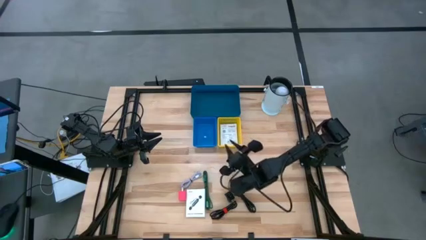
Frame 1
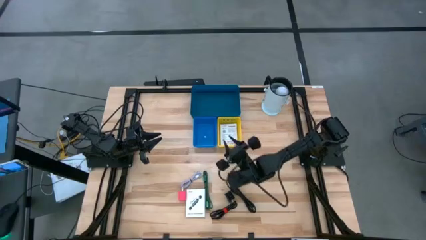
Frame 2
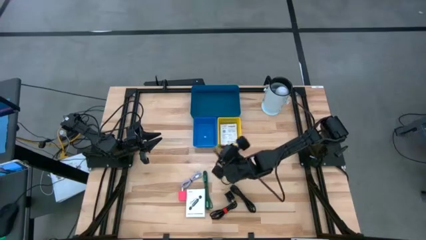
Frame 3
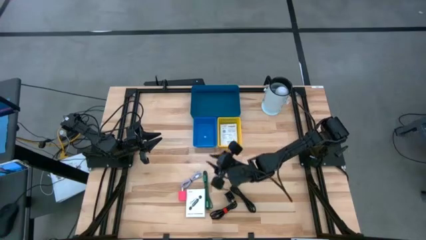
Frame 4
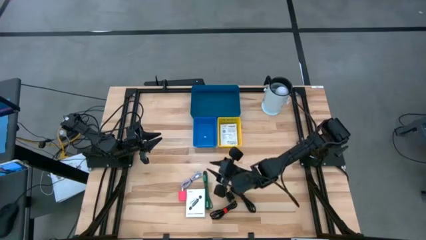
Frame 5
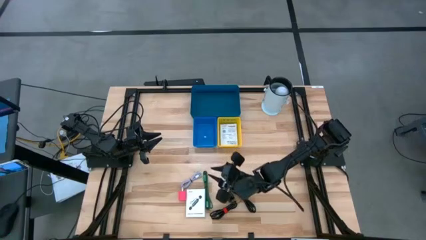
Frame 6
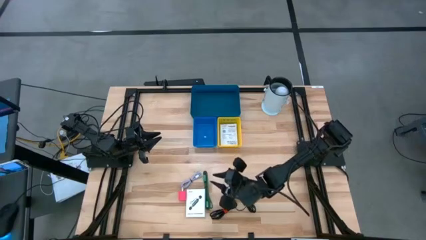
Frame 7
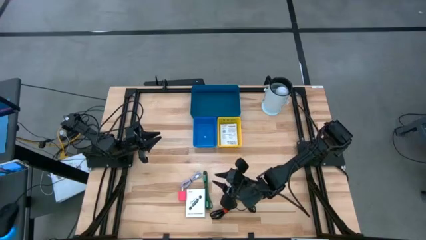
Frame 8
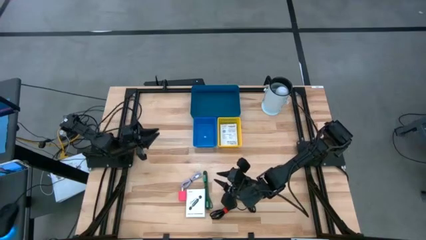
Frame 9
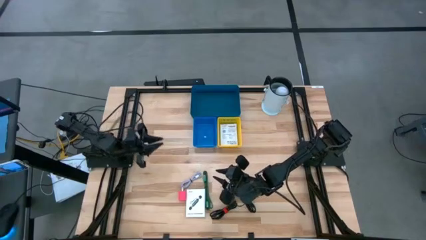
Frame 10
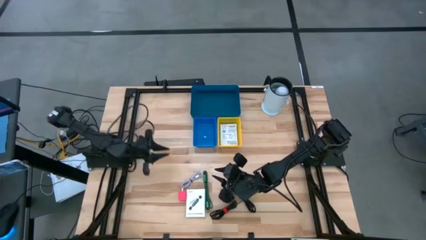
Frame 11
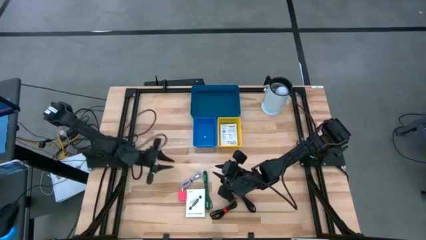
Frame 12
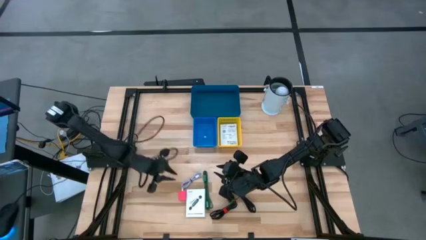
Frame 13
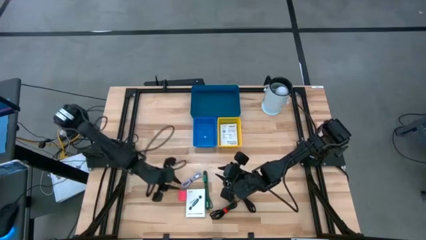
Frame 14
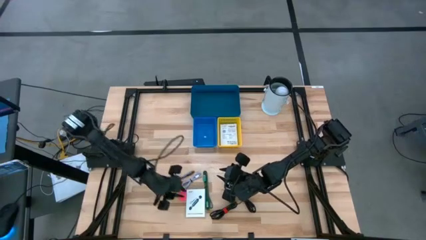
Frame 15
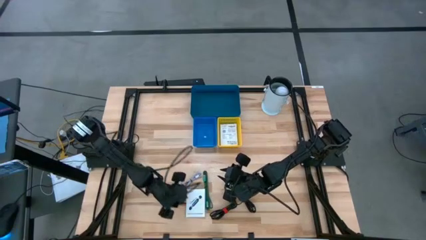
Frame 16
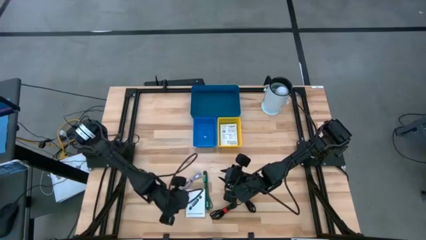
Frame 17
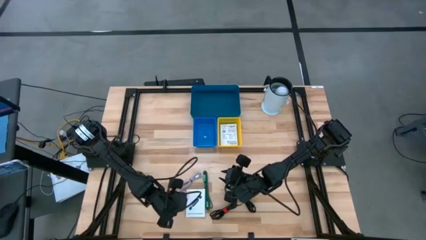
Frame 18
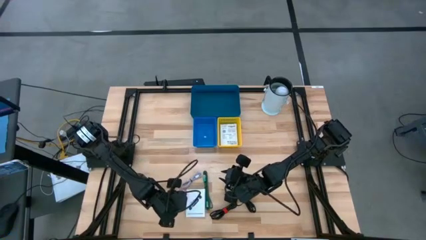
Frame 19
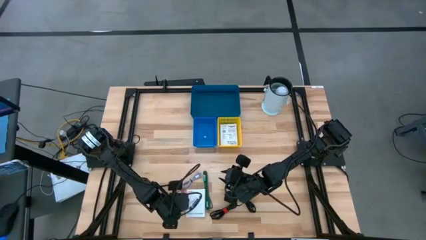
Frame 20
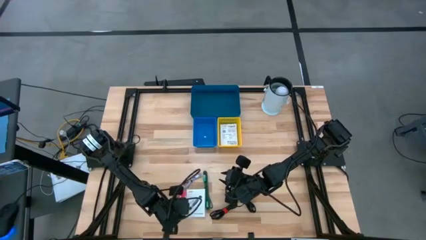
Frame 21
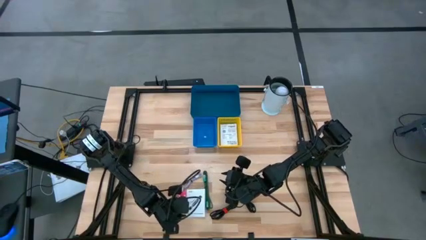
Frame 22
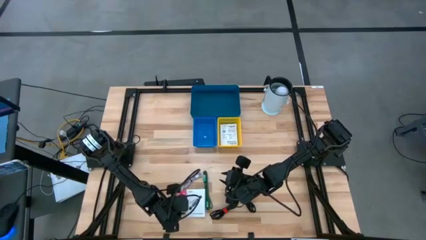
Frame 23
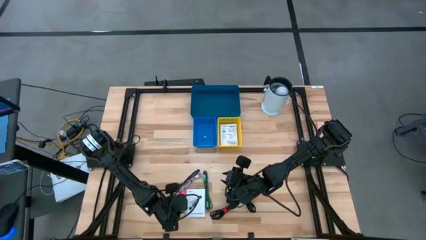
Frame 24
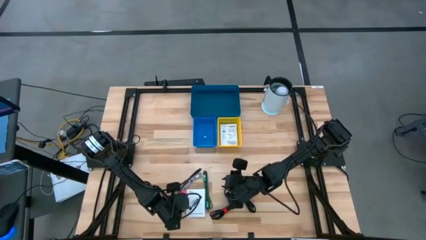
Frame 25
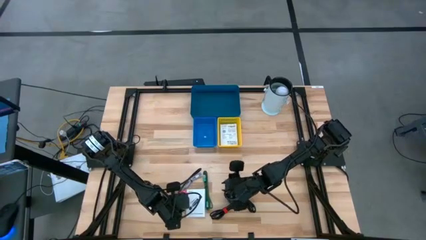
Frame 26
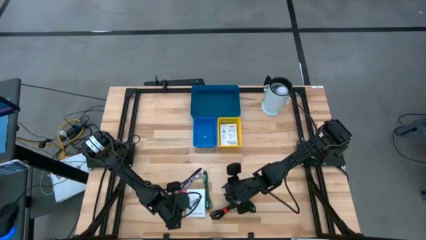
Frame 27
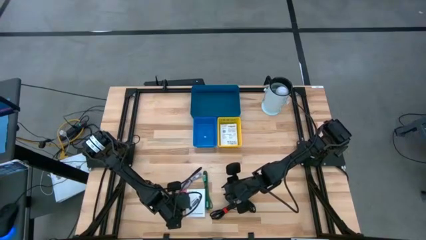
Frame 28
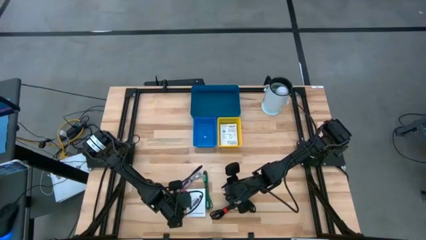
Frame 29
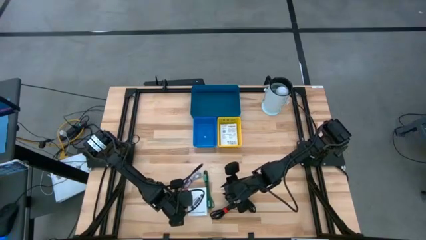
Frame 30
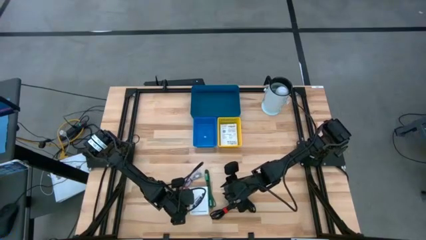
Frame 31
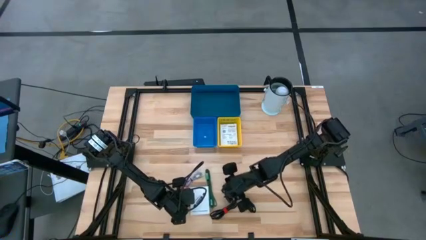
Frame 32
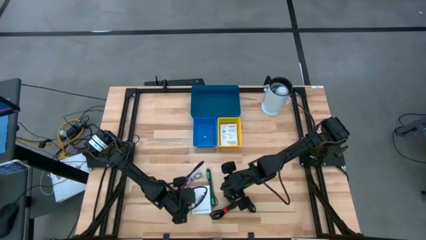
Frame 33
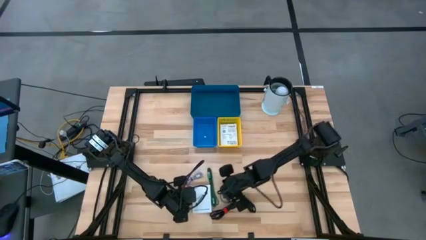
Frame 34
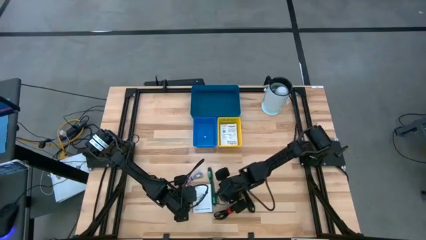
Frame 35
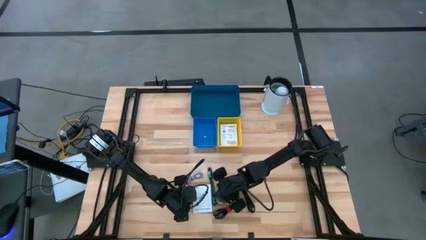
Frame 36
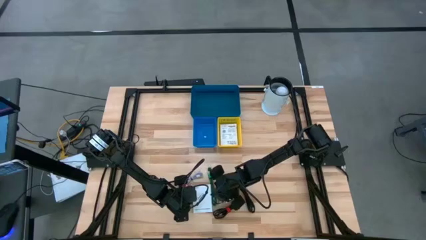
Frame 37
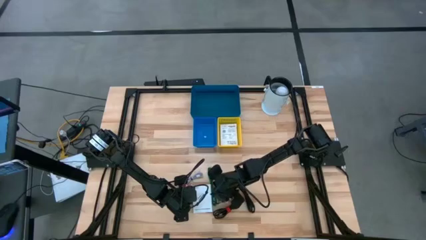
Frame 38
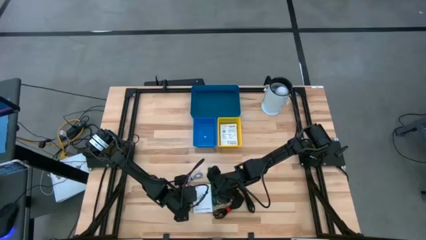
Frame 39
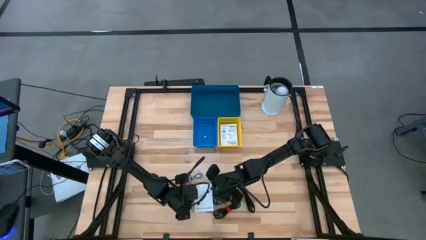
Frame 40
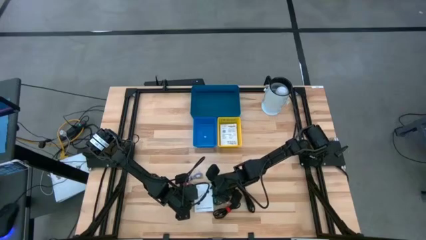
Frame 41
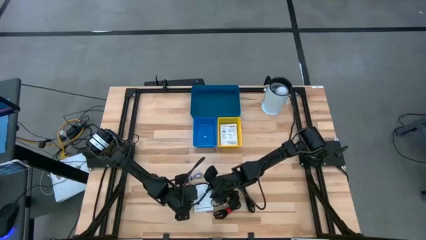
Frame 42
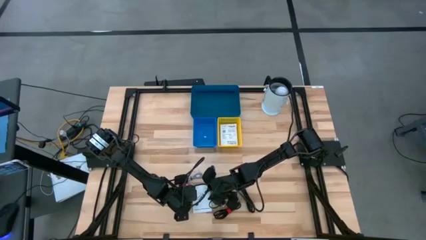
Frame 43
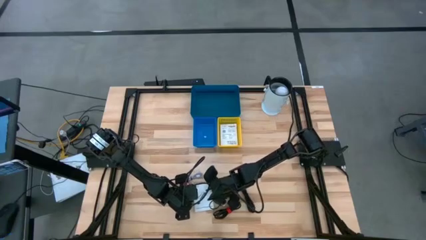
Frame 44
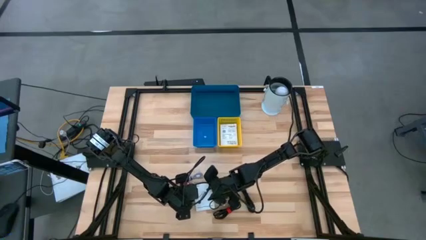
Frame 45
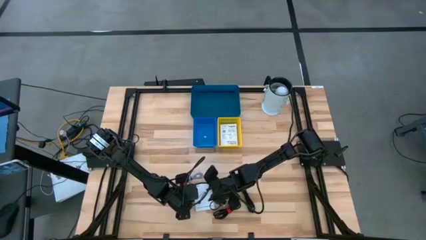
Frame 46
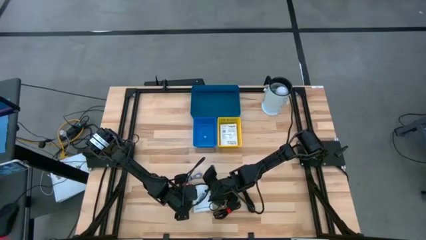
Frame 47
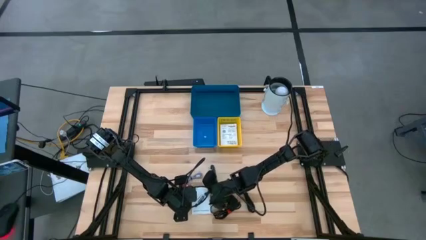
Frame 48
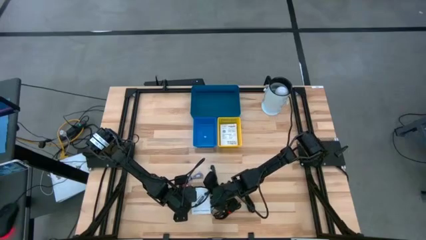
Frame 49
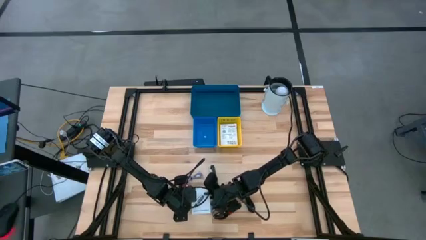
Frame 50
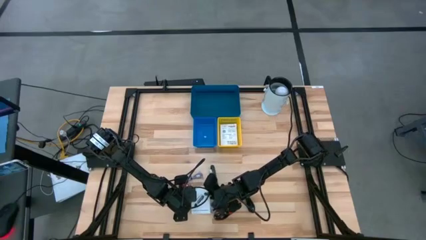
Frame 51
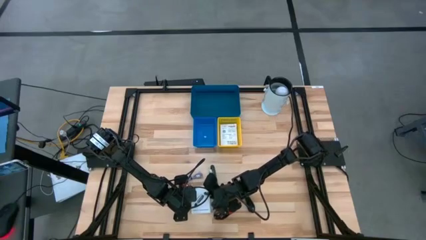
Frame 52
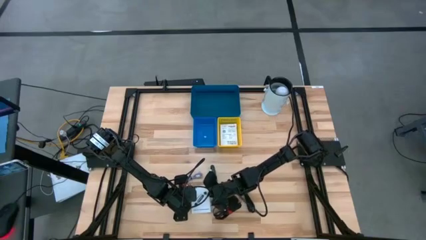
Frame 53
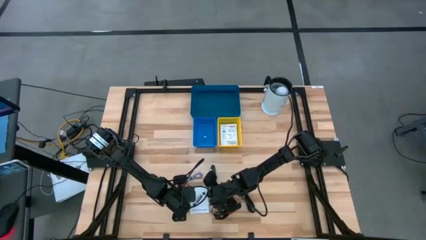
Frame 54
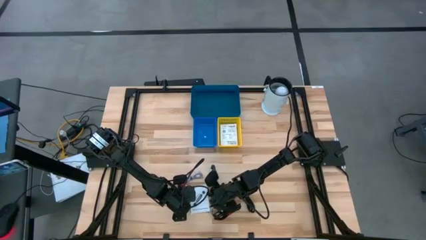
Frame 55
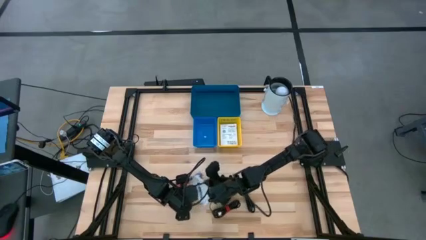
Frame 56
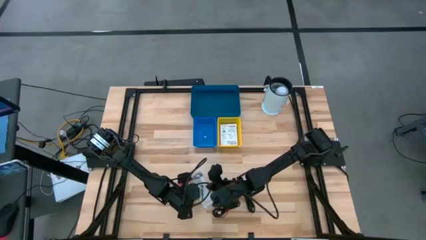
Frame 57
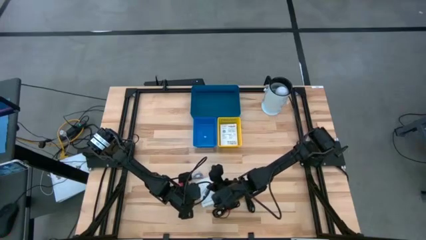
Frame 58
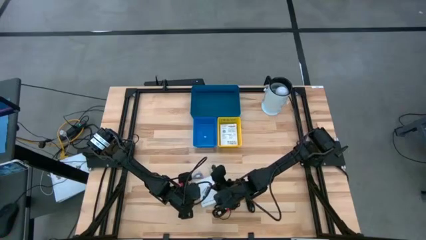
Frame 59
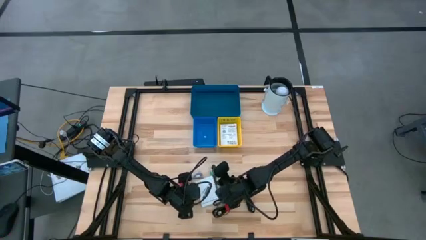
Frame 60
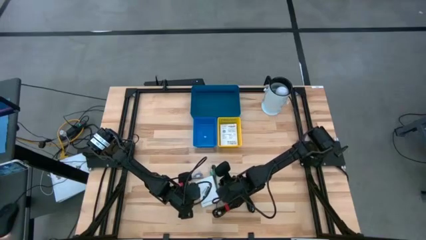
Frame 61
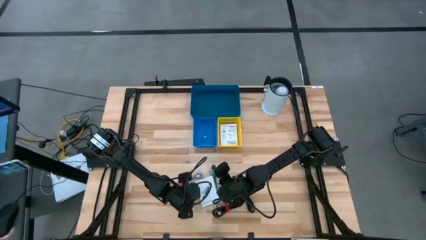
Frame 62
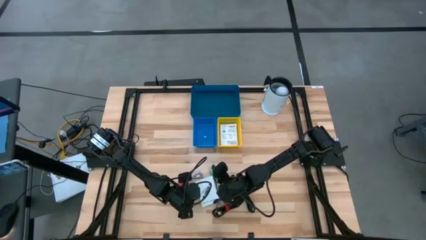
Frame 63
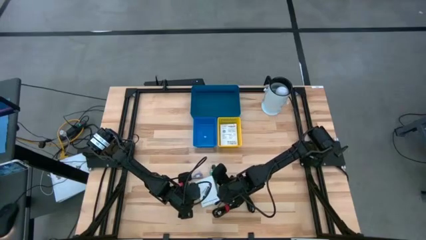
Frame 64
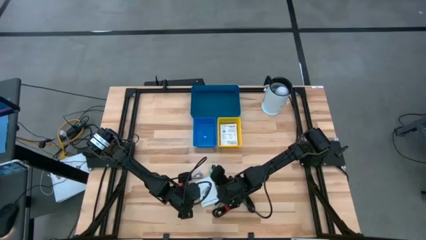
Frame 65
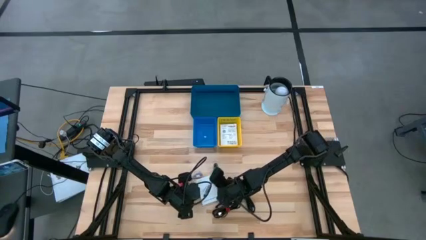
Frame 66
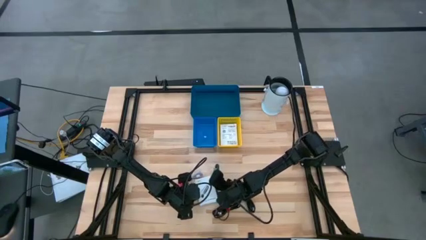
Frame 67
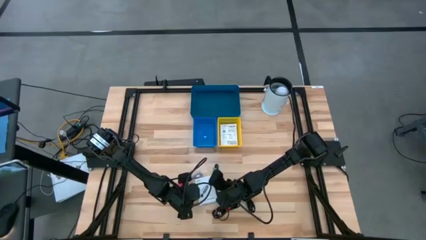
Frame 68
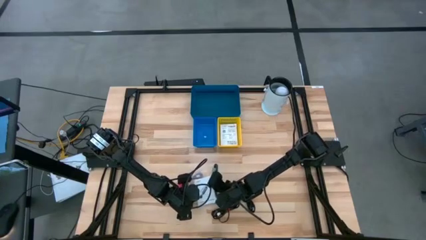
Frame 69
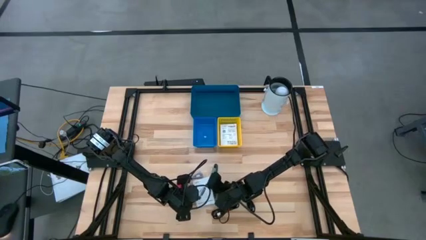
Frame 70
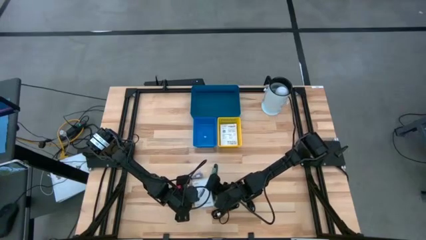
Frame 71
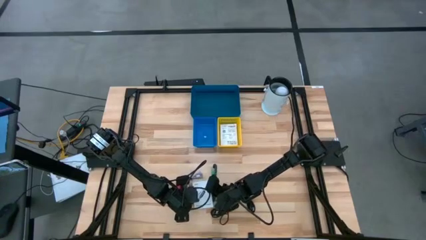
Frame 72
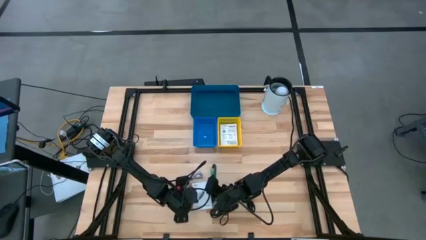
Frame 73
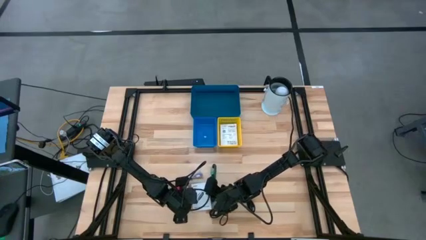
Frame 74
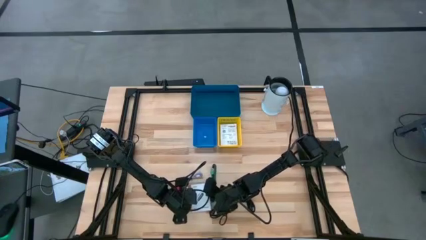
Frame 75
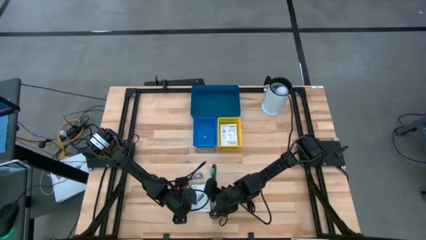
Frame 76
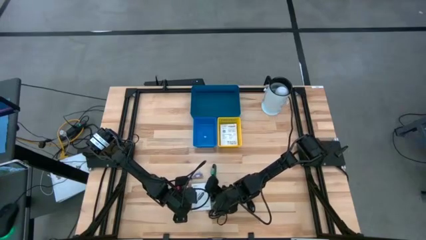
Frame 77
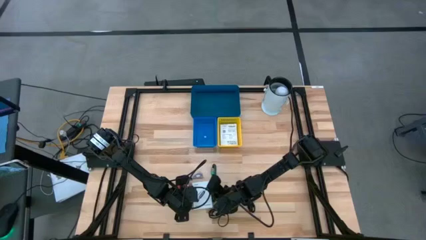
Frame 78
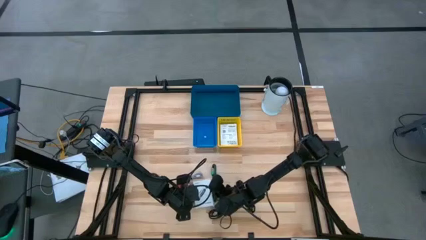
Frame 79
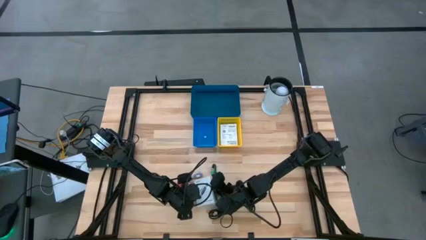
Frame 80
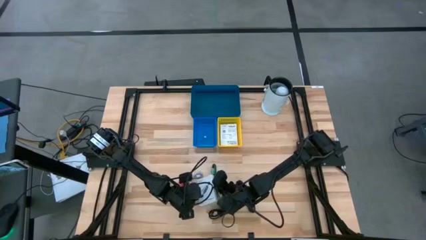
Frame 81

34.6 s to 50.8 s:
Task: Pick and place items into bin
Put the white card reader box into the yellow bin
